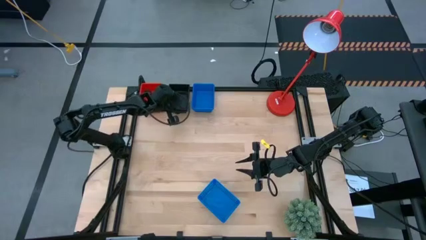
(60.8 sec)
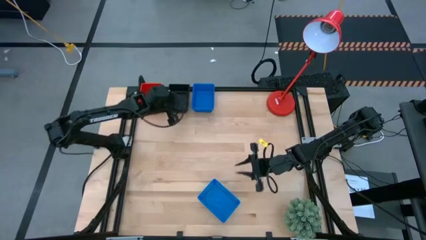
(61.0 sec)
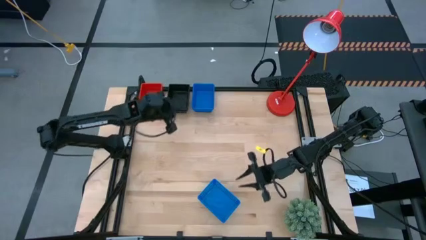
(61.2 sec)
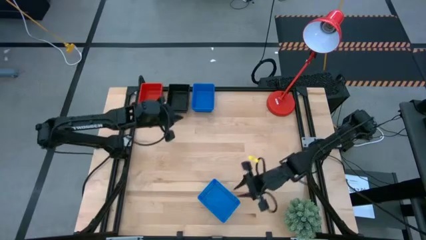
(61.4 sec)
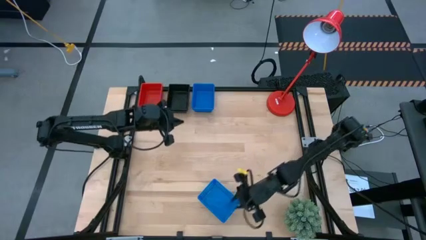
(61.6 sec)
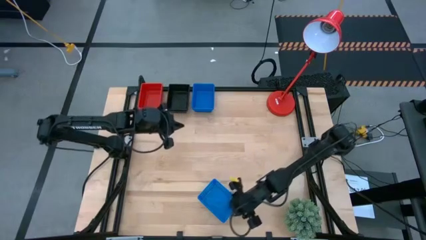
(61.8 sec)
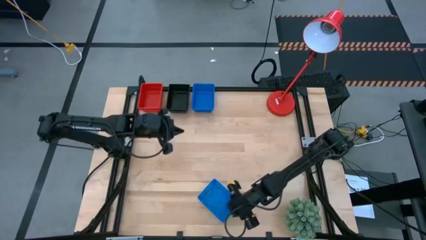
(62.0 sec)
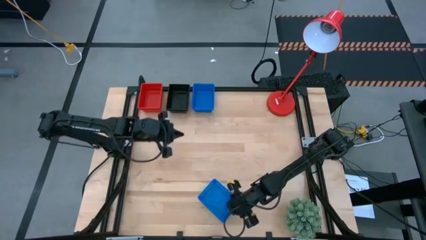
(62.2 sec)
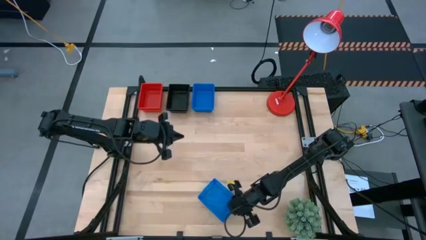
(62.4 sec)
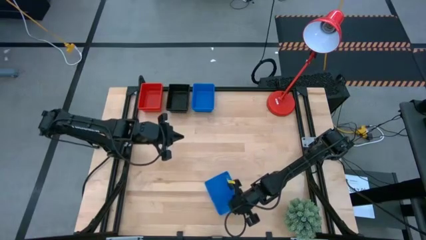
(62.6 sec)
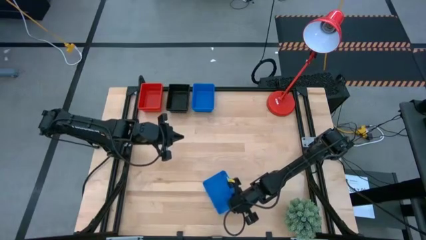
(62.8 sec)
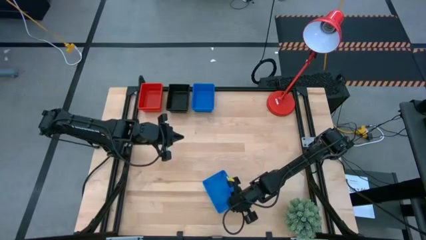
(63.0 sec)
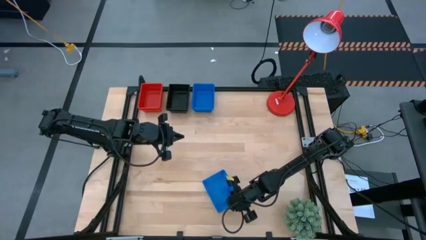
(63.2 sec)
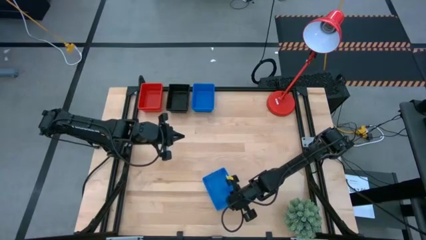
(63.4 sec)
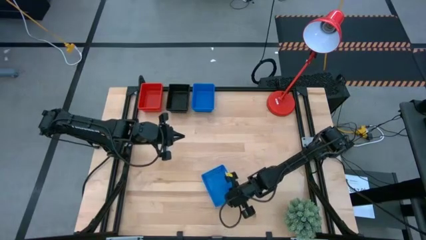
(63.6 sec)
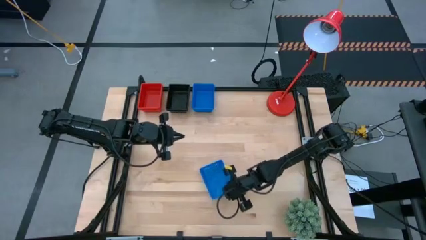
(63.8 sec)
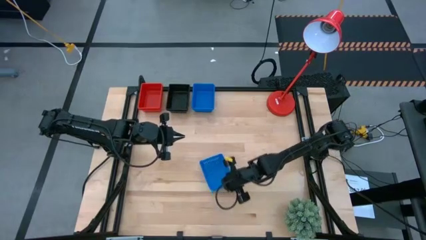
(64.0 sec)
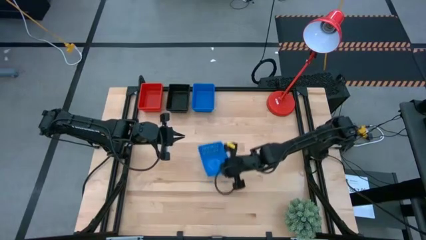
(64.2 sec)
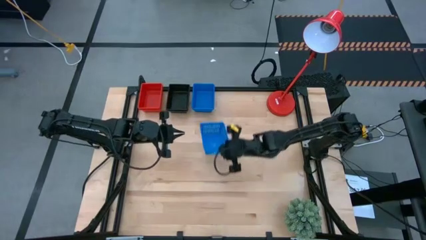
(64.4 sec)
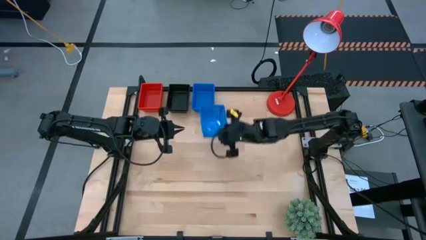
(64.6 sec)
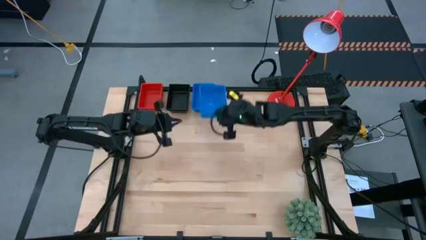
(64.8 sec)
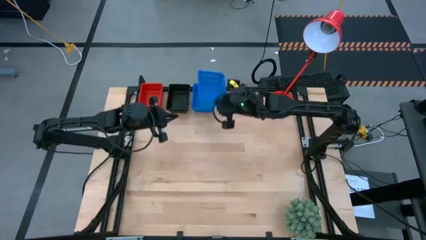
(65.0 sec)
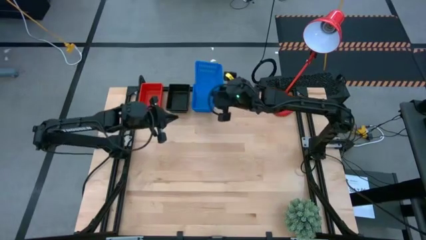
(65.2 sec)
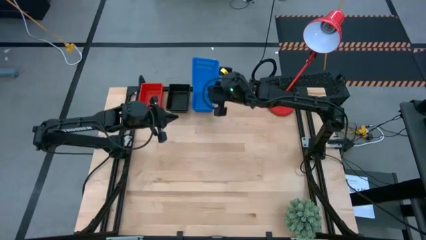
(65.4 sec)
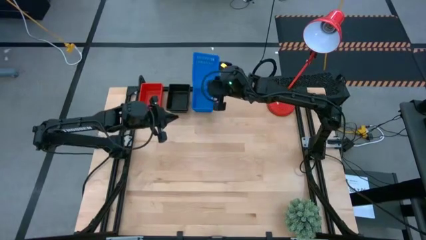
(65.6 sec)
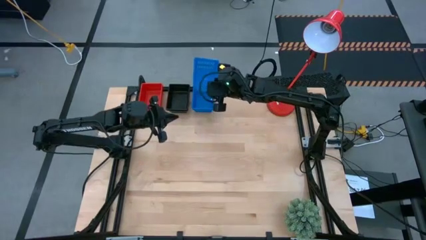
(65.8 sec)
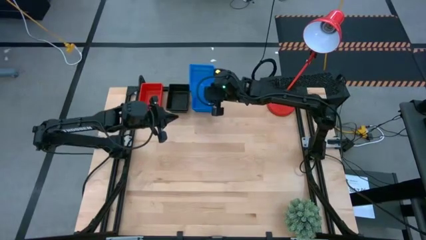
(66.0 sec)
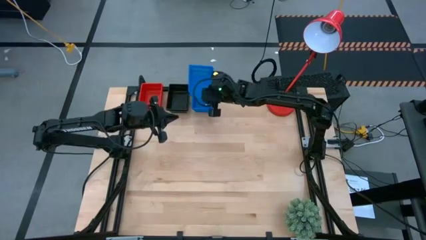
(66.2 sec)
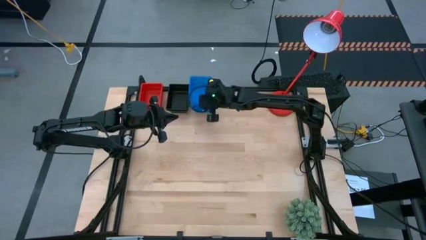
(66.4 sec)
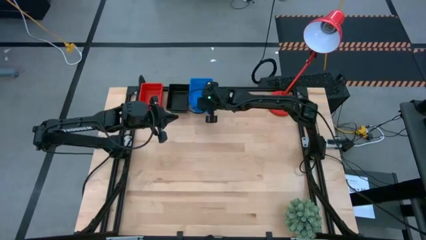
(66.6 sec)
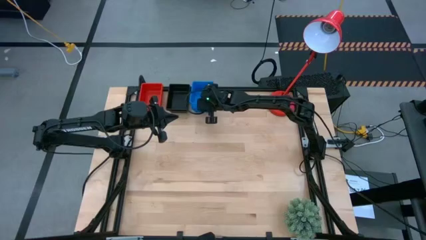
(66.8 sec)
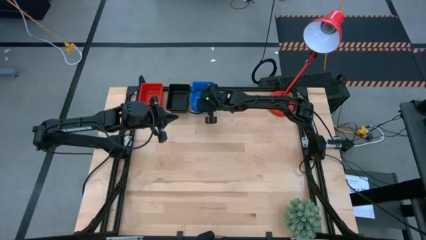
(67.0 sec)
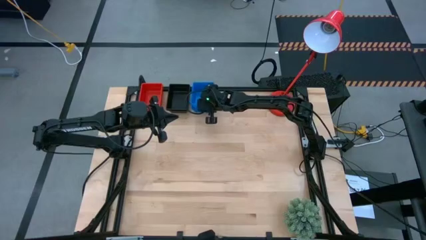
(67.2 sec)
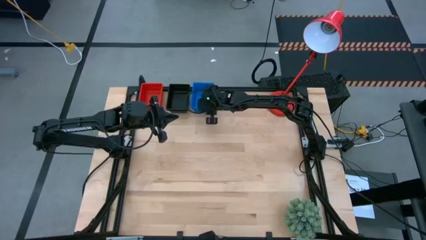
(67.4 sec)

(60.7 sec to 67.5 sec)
Stack the bottom blue bin on top of the stacked blue bins

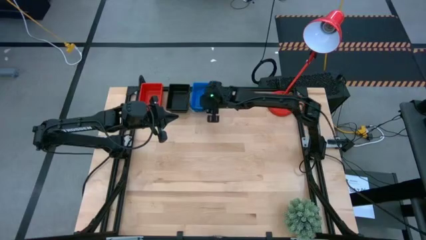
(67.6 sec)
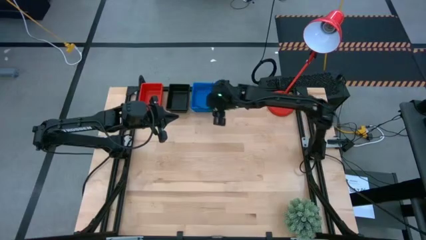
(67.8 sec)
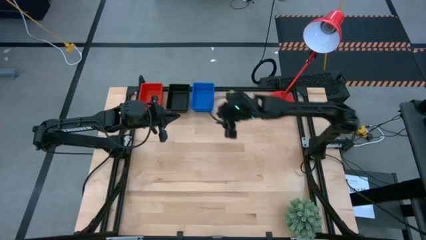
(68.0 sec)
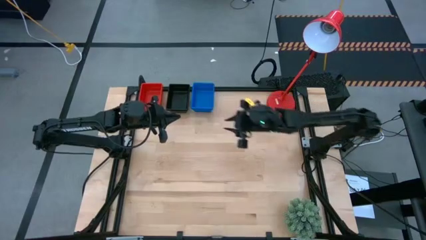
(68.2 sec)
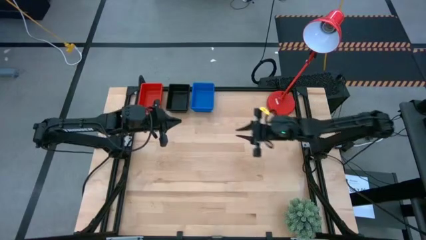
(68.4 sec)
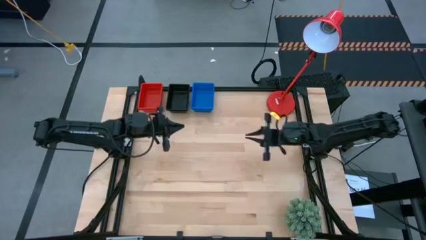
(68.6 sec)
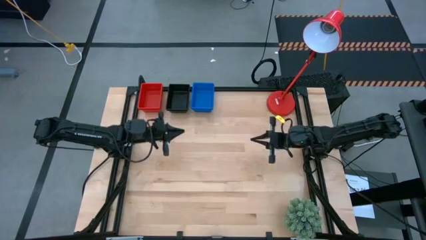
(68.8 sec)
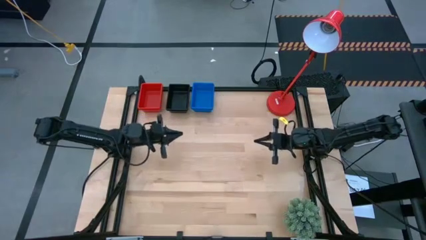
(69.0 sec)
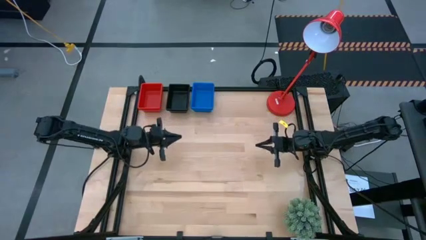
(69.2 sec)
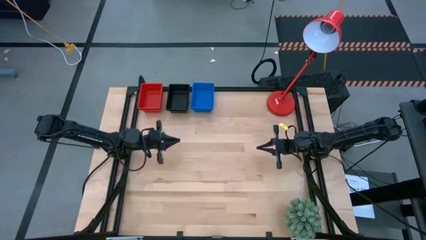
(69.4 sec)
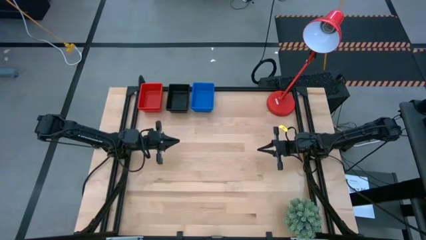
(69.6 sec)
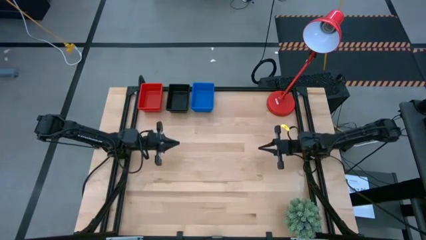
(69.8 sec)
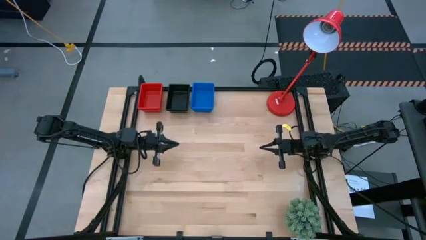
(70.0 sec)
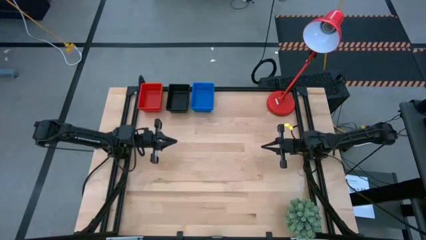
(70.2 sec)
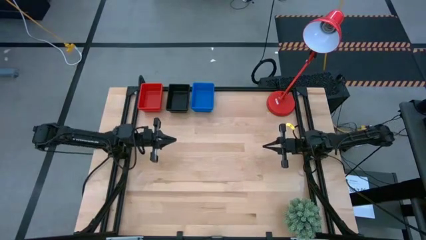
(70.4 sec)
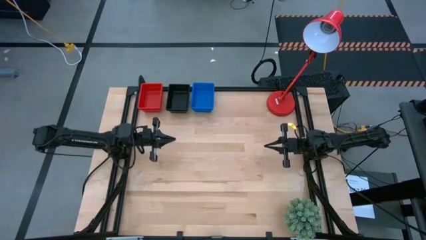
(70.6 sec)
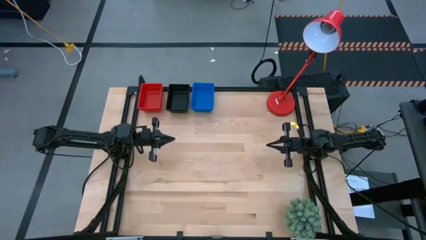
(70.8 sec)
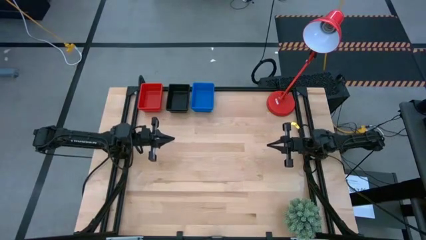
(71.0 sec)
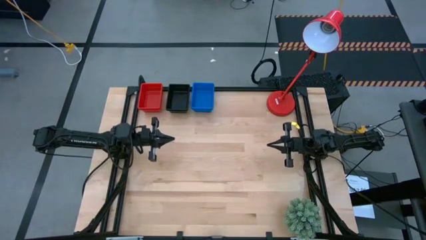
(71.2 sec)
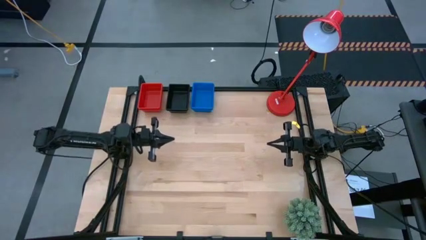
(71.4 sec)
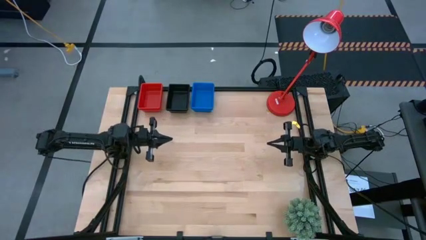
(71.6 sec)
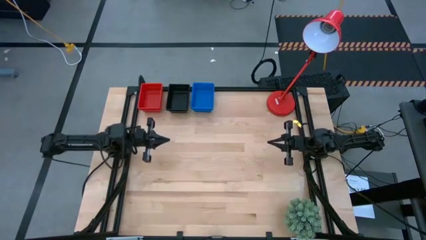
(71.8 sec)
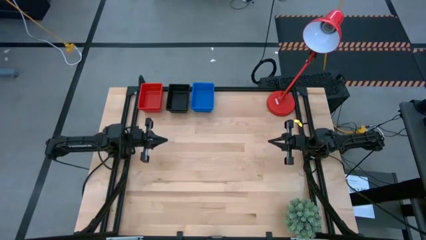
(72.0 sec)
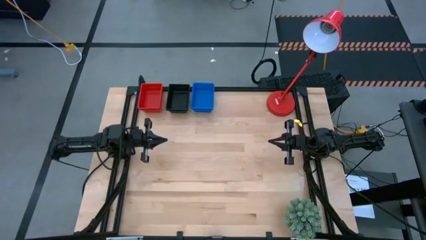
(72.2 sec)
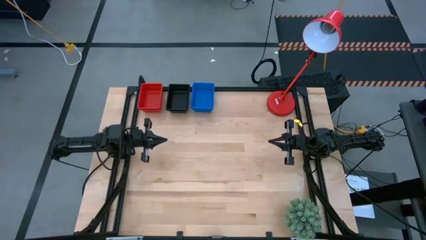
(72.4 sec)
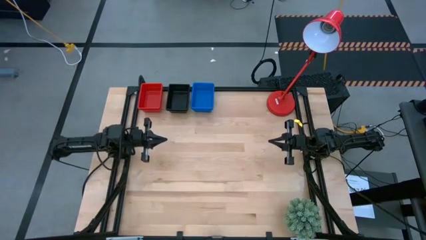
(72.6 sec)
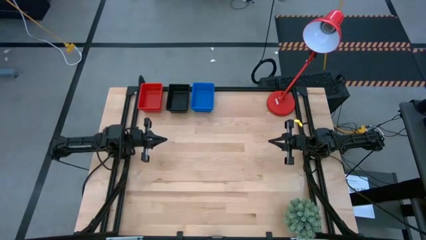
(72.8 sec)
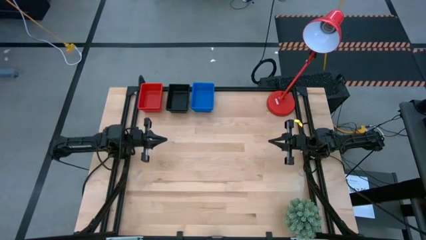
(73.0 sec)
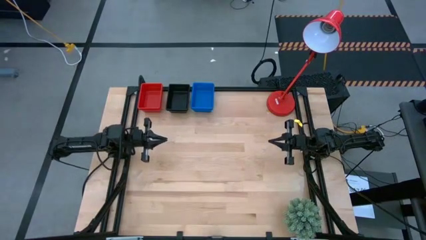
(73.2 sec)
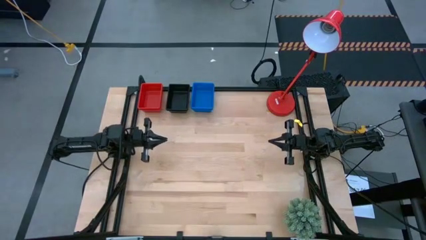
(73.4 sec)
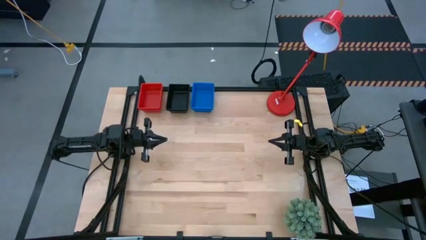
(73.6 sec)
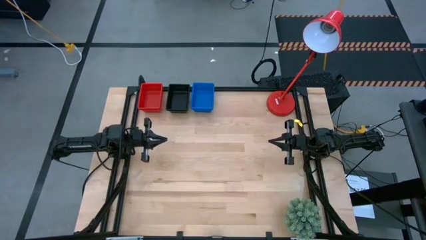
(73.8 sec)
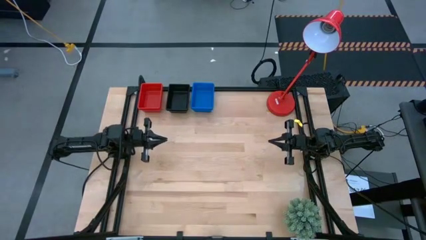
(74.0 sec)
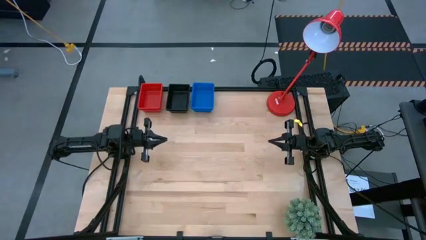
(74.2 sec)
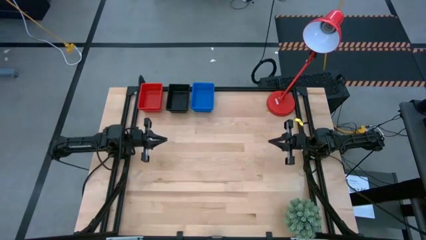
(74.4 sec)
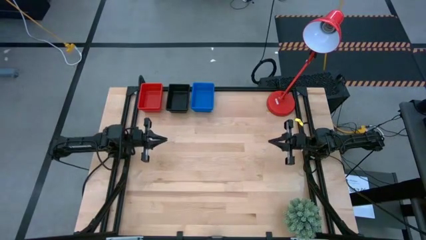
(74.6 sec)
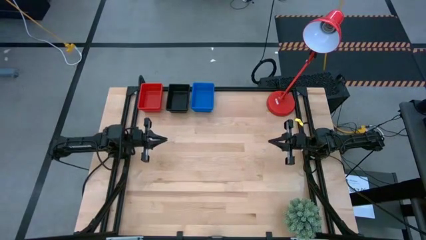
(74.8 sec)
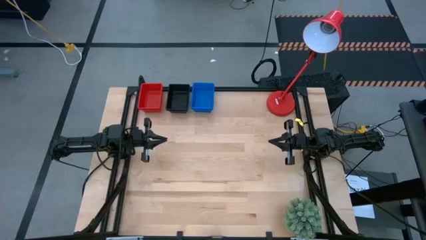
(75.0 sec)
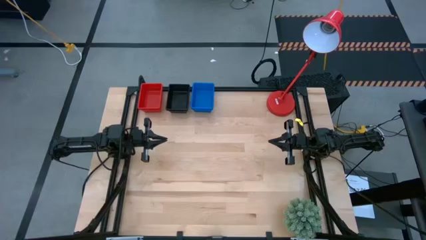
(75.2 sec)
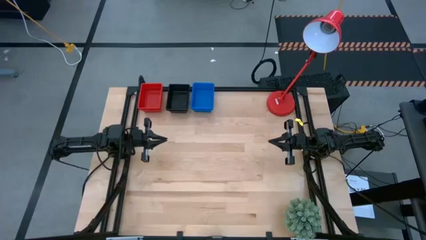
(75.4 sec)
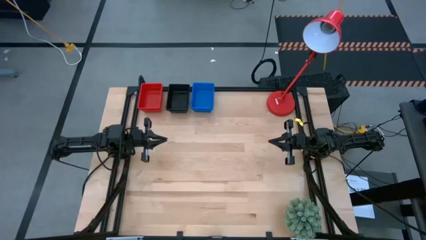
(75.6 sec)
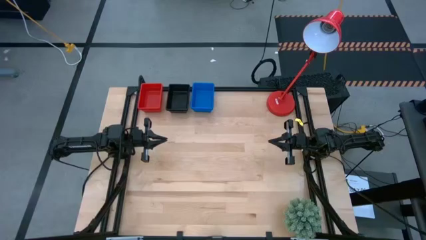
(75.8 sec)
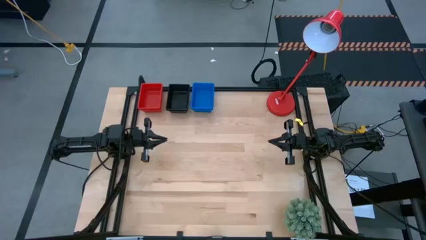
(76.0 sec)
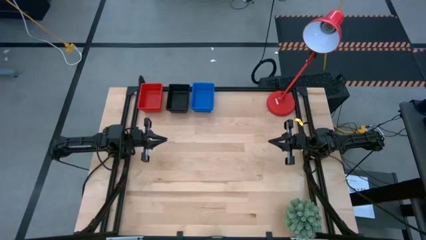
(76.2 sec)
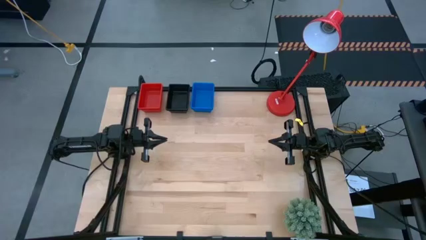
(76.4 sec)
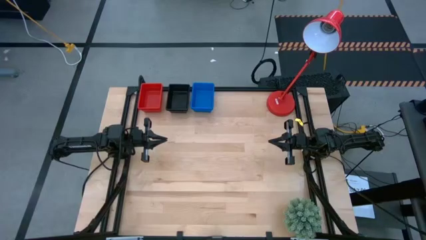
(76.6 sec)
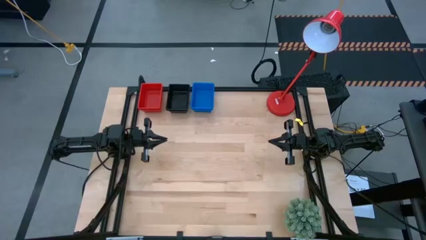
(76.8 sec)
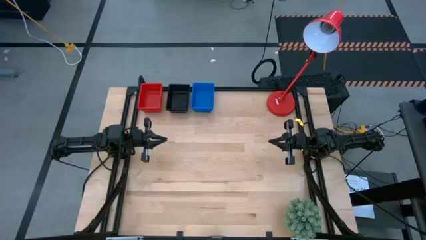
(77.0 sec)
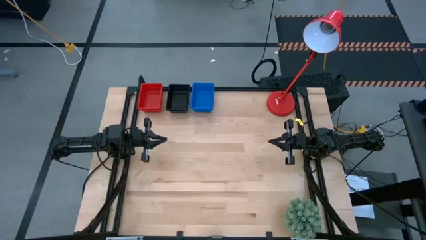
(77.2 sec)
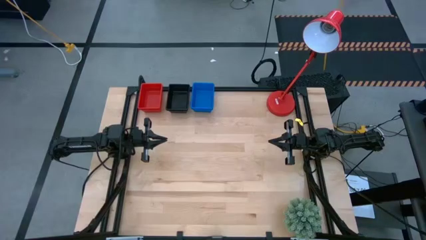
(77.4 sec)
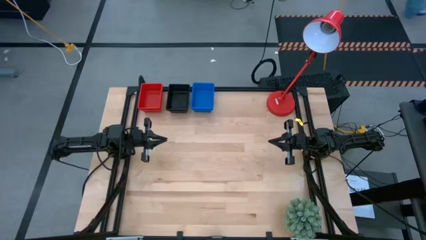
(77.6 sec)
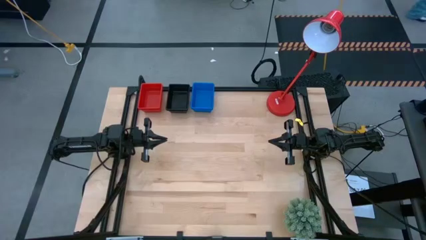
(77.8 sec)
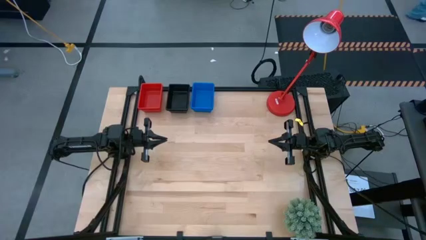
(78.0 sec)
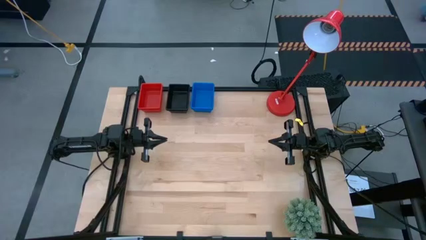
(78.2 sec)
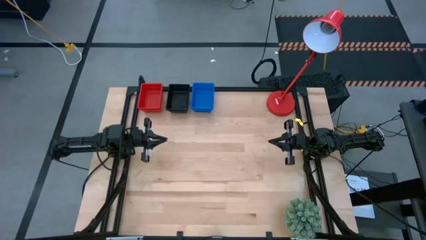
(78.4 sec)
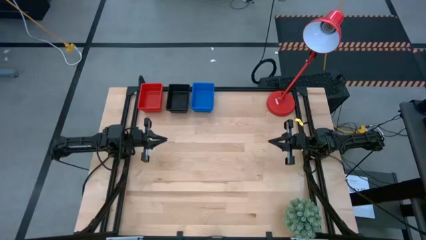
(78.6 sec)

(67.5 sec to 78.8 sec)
Return to Home Position
